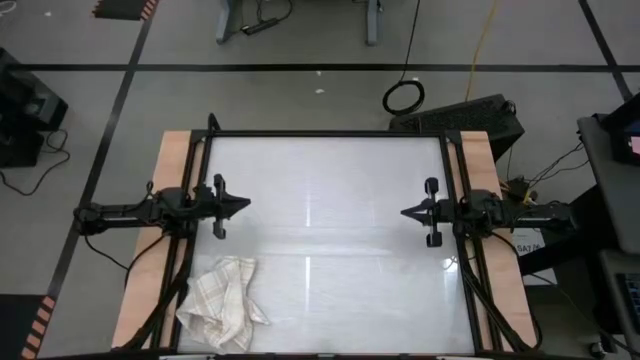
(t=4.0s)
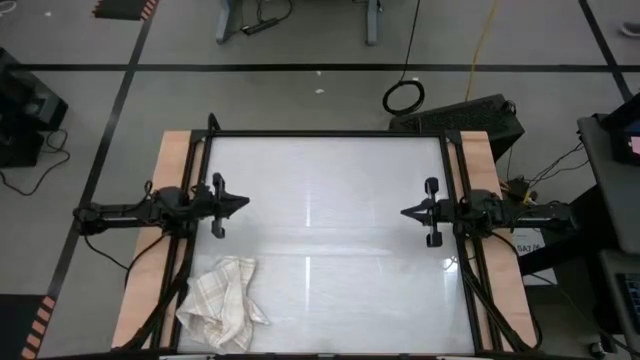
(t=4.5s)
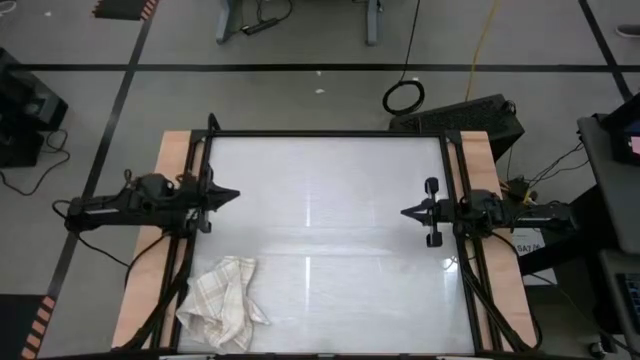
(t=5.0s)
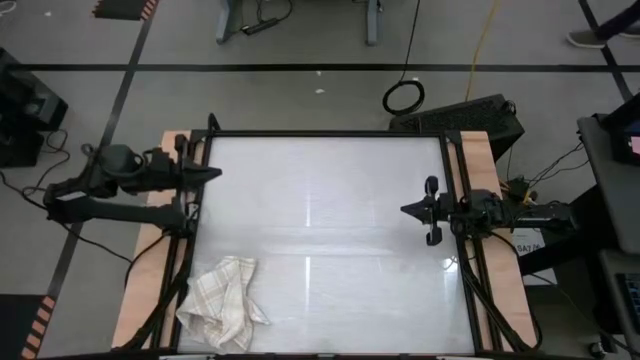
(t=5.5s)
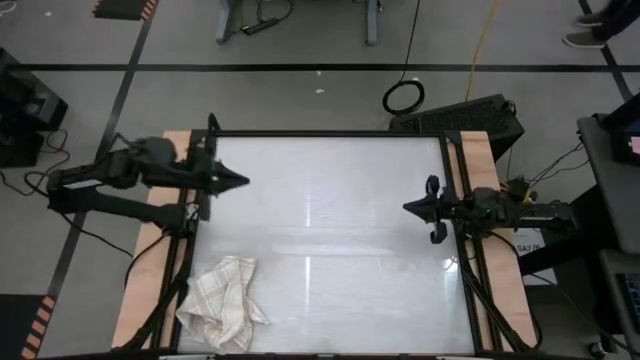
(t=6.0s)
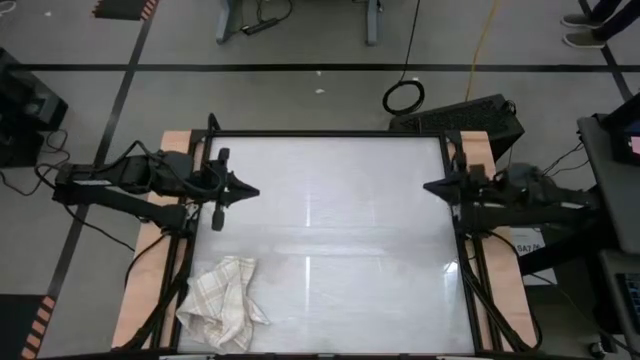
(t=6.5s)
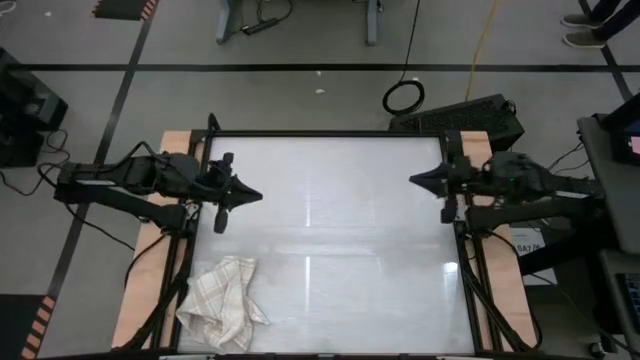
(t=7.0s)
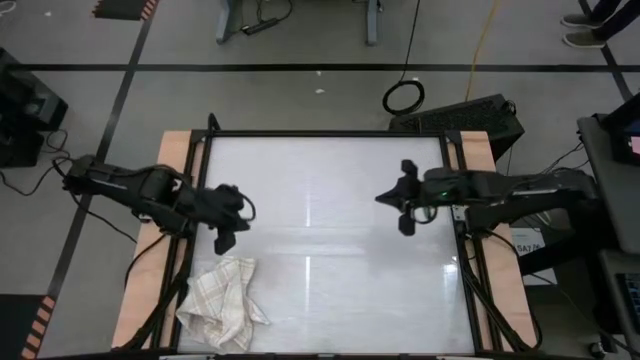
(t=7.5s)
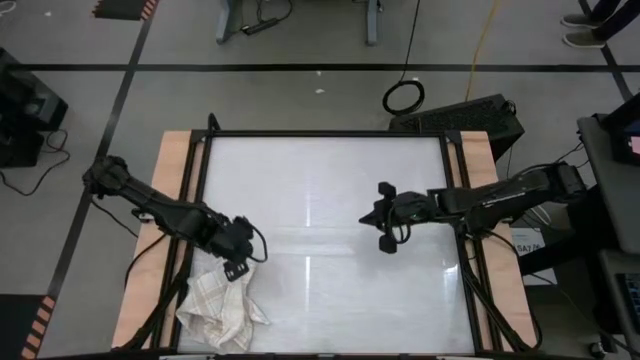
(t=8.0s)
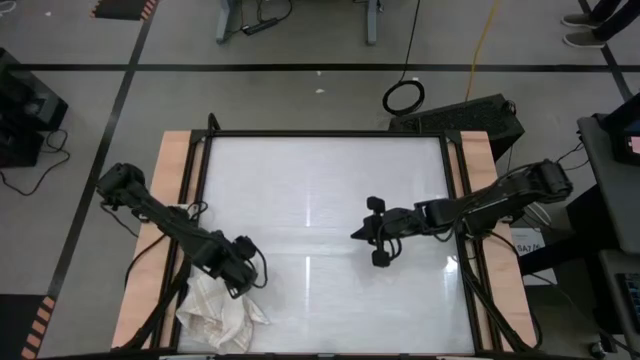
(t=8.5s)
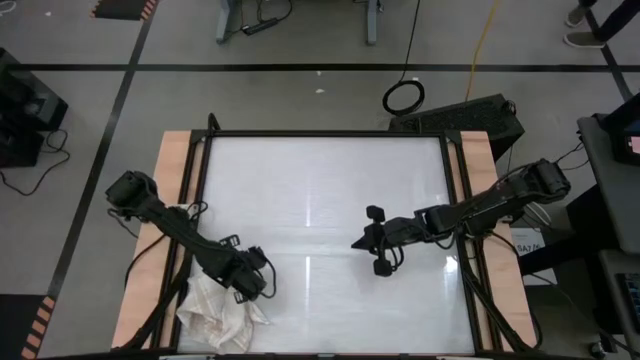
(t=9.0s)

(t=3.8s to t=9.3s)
Task: Roll towel
Roll the white towel

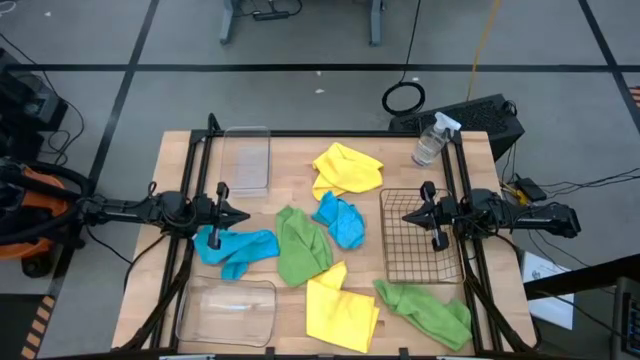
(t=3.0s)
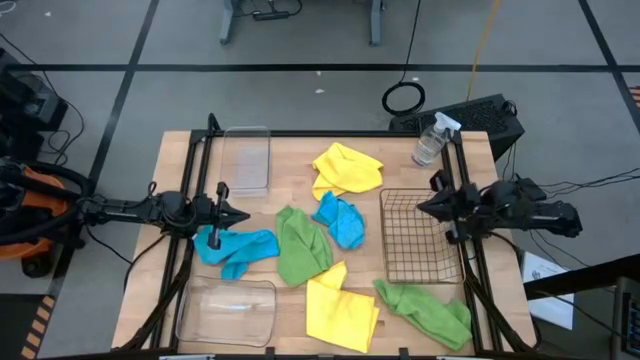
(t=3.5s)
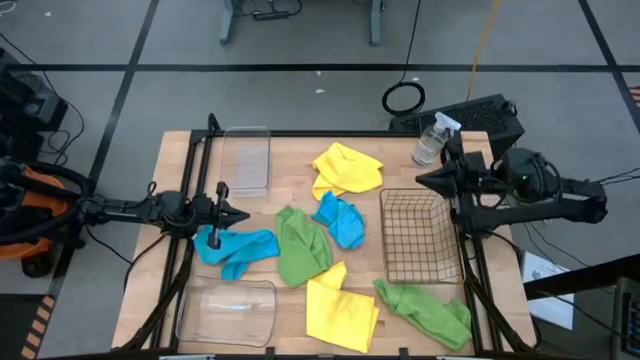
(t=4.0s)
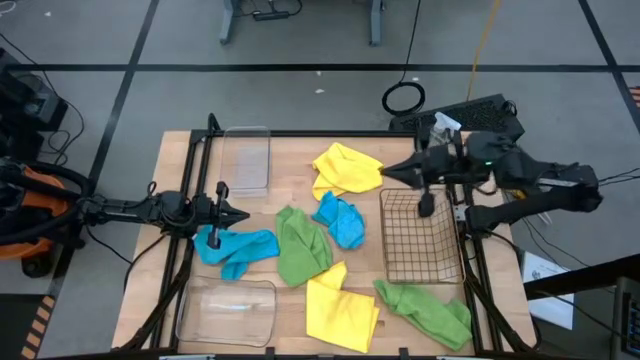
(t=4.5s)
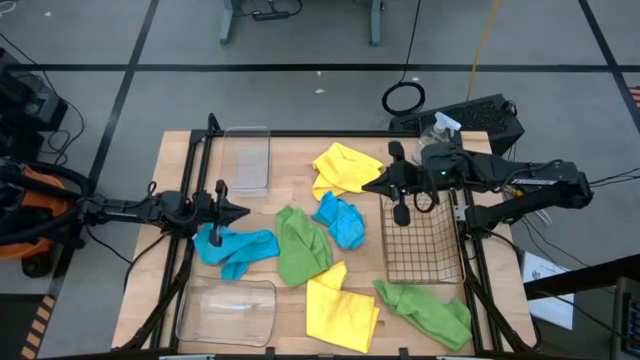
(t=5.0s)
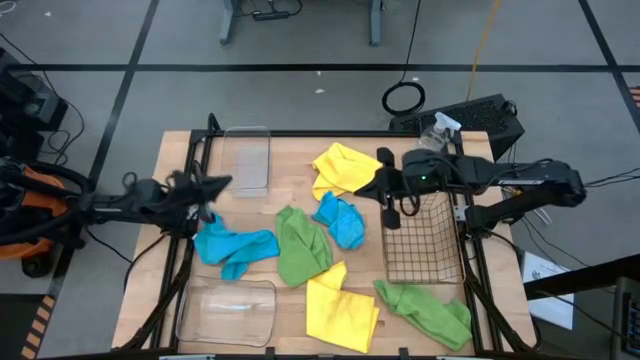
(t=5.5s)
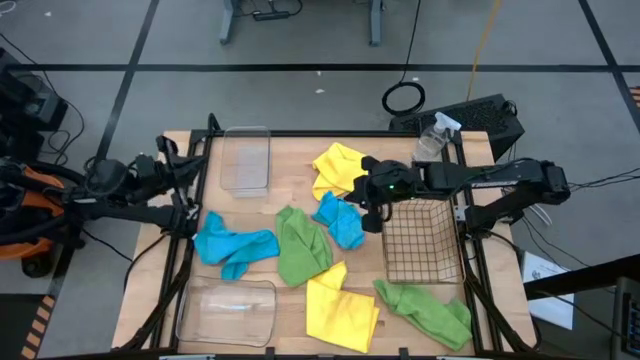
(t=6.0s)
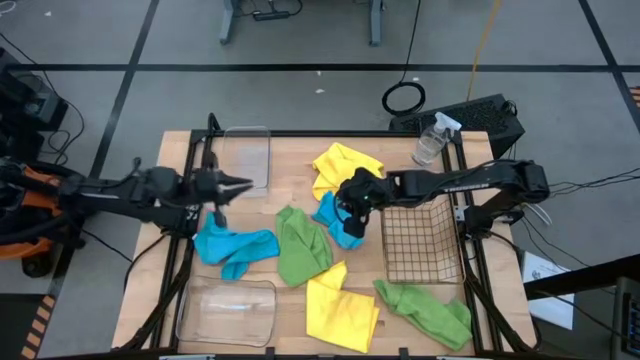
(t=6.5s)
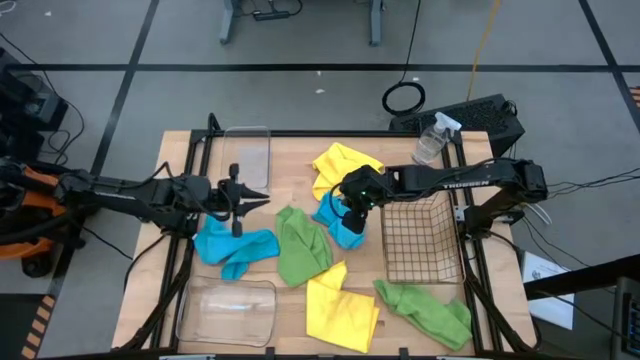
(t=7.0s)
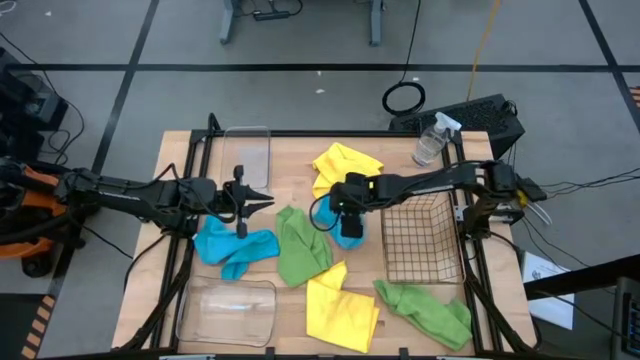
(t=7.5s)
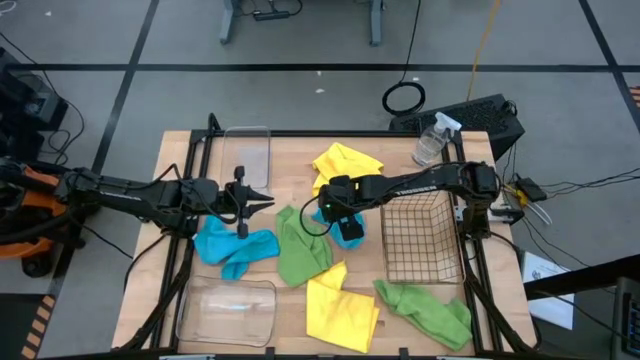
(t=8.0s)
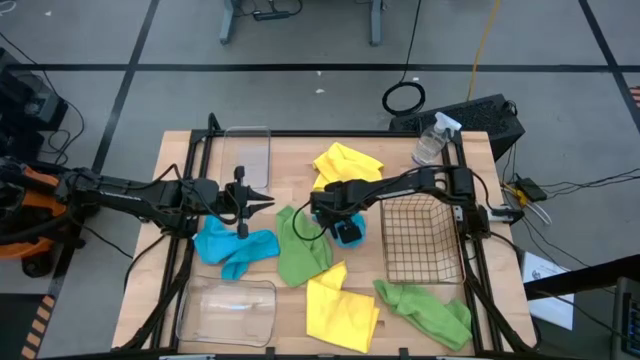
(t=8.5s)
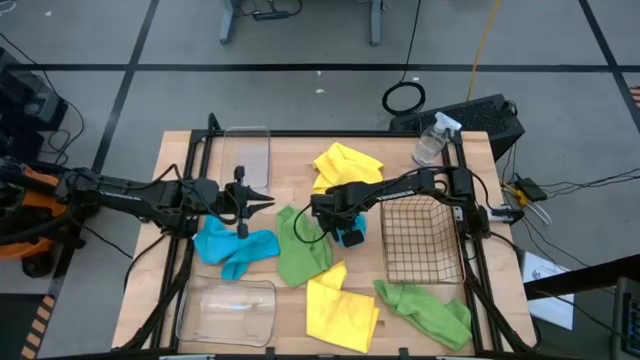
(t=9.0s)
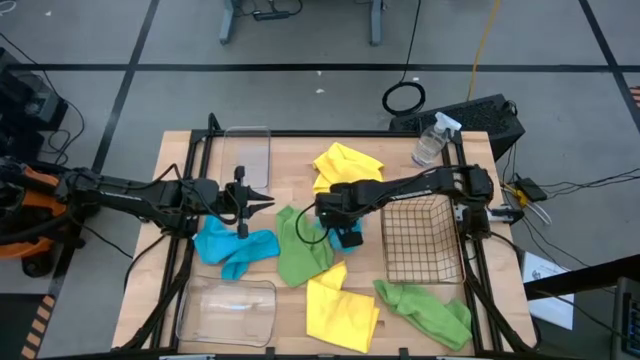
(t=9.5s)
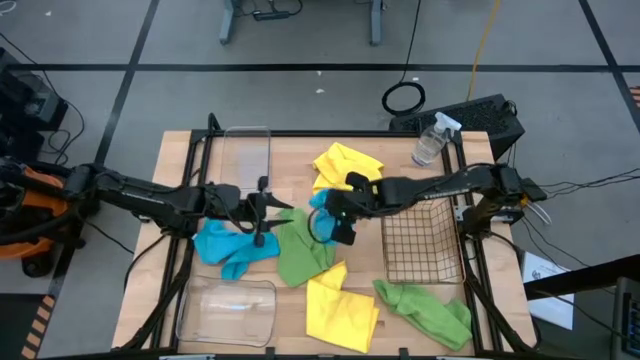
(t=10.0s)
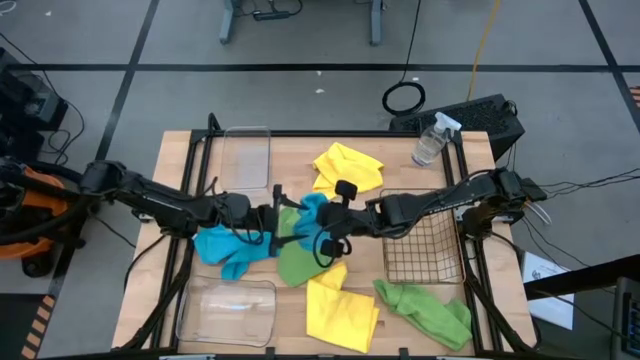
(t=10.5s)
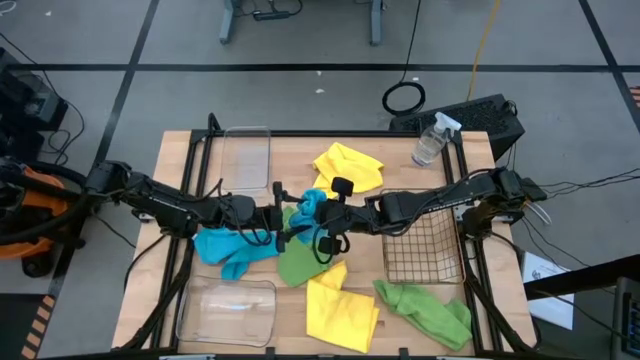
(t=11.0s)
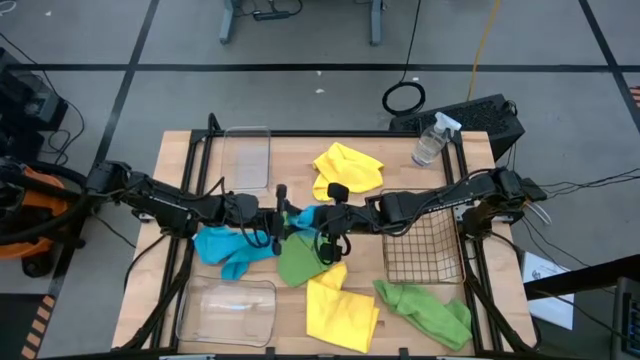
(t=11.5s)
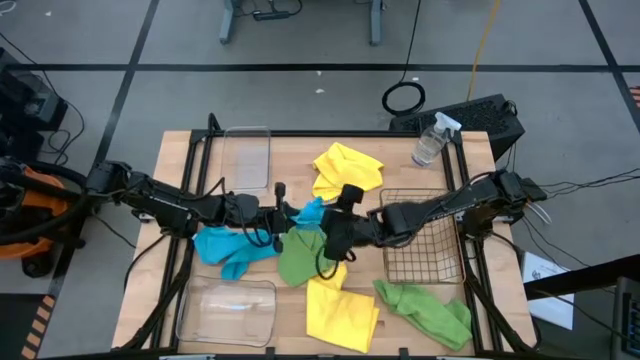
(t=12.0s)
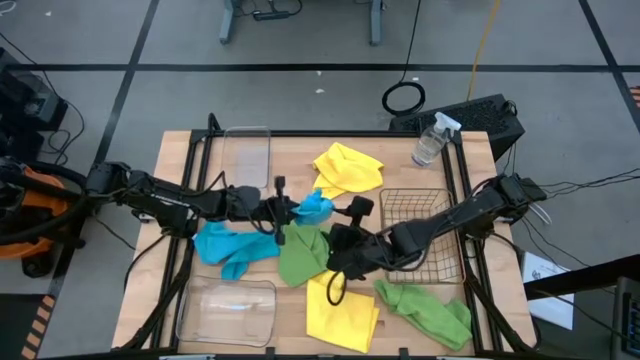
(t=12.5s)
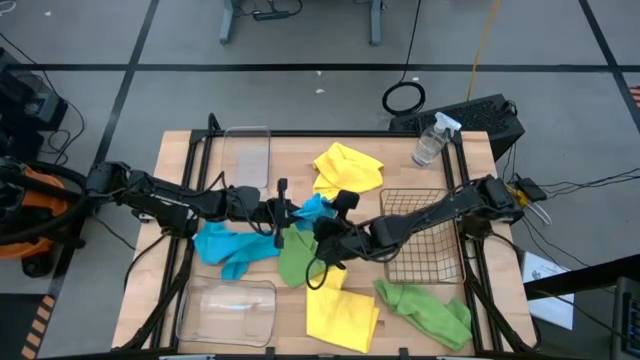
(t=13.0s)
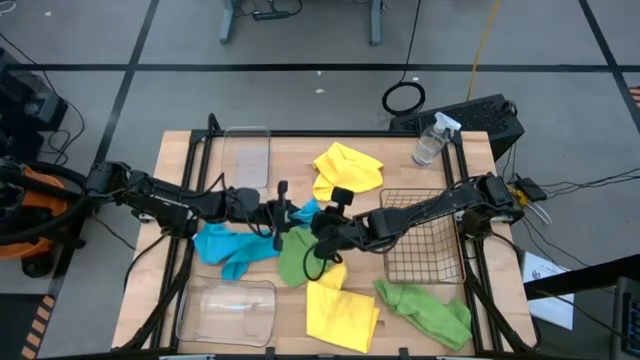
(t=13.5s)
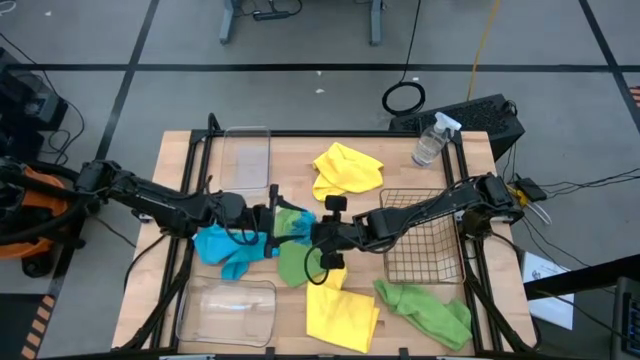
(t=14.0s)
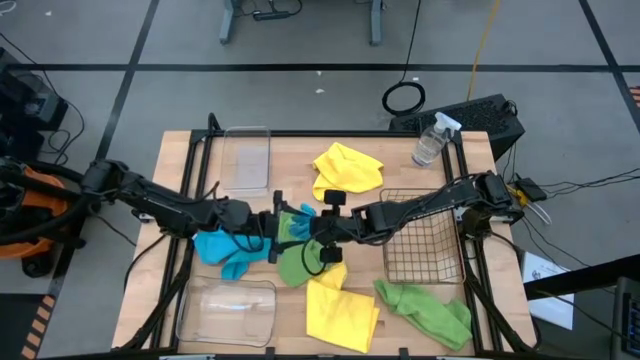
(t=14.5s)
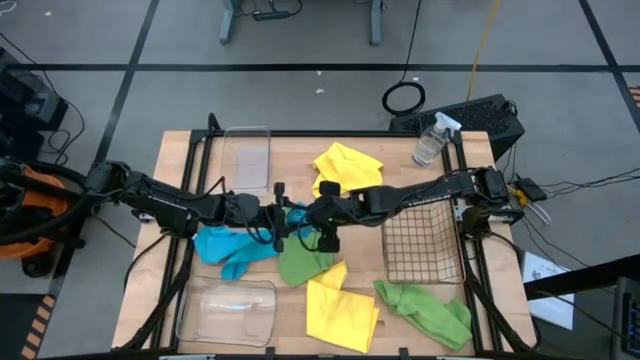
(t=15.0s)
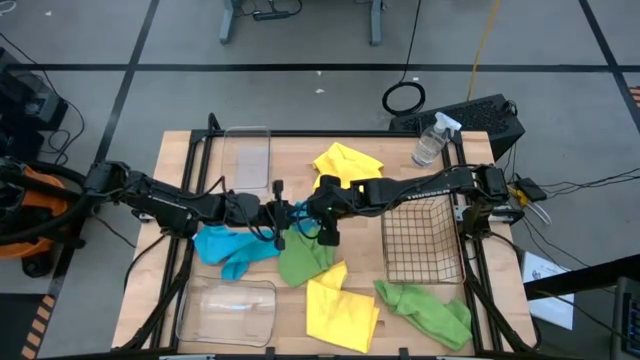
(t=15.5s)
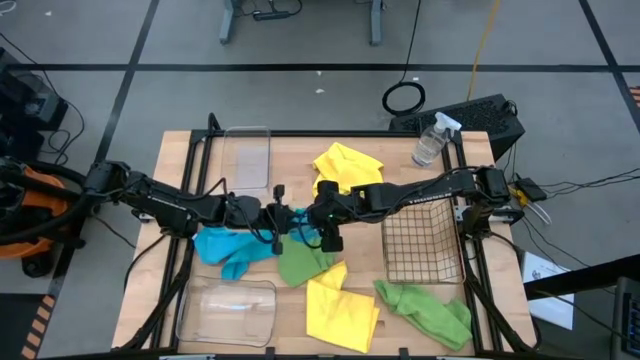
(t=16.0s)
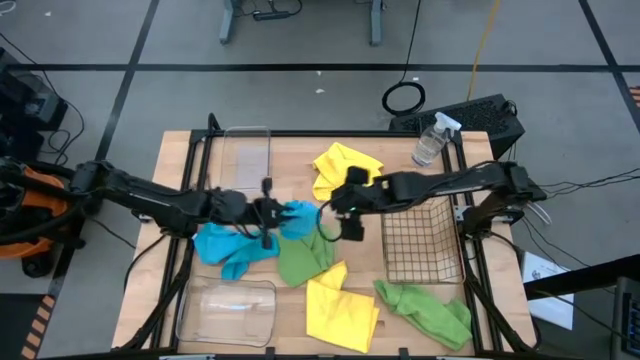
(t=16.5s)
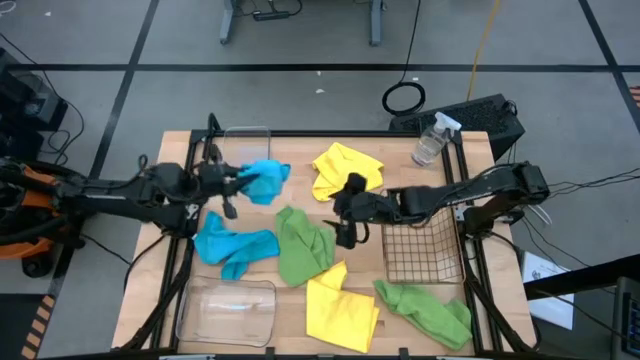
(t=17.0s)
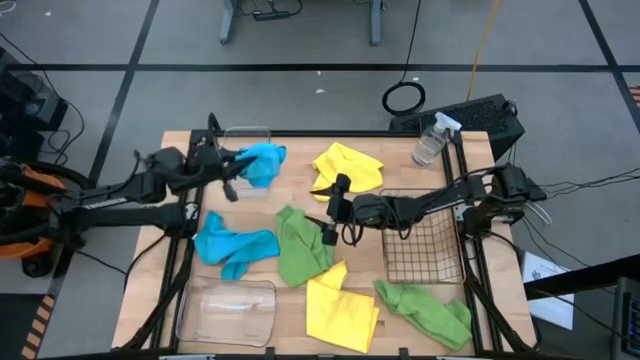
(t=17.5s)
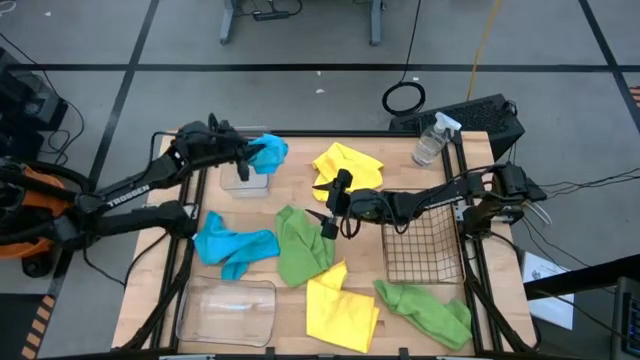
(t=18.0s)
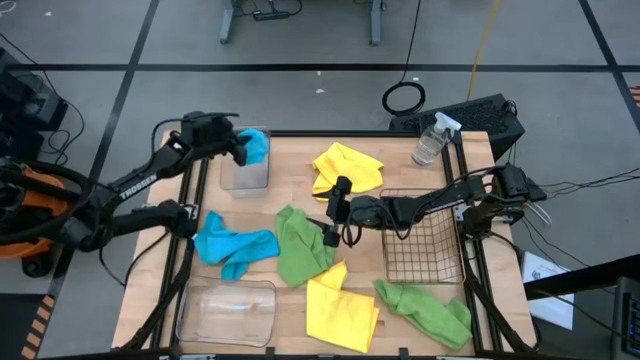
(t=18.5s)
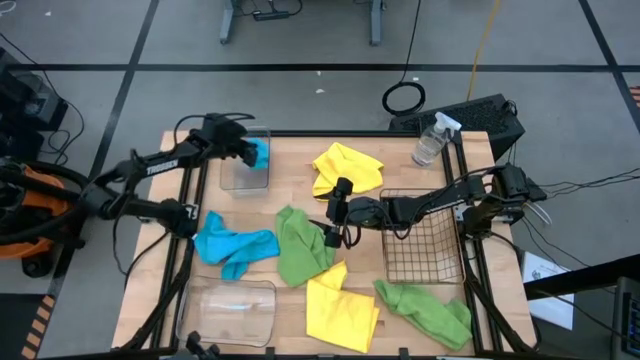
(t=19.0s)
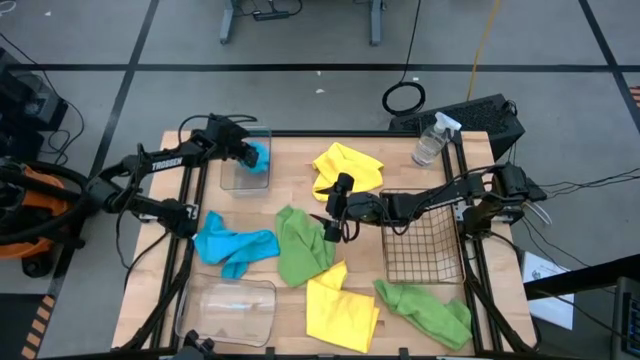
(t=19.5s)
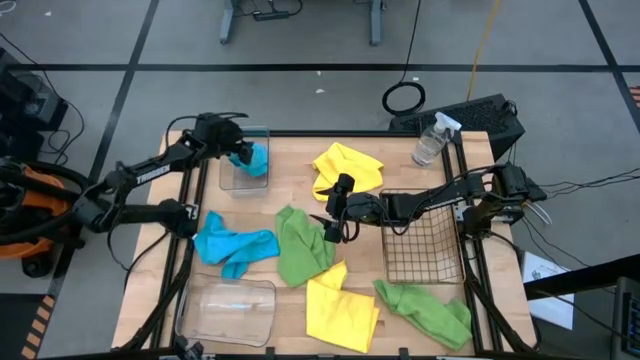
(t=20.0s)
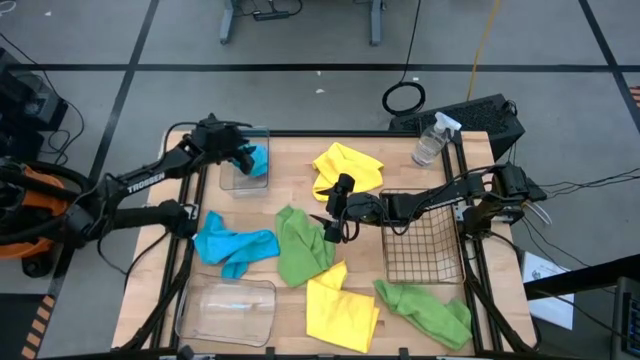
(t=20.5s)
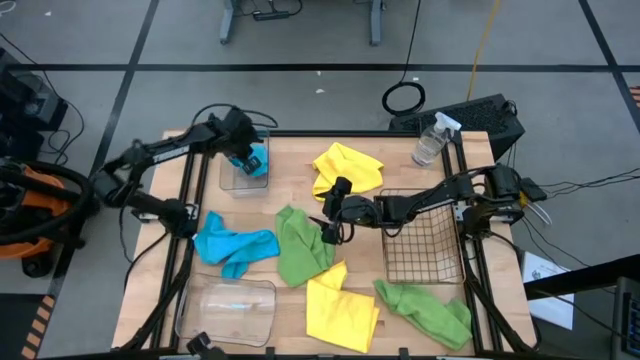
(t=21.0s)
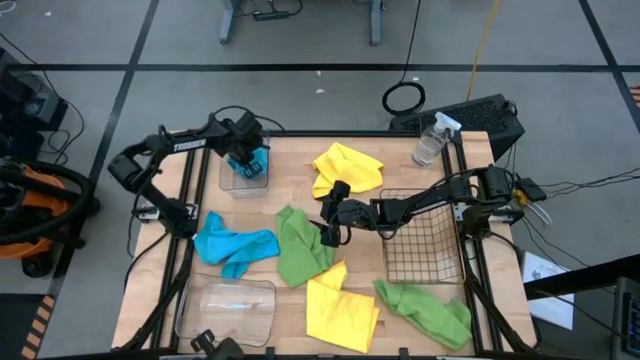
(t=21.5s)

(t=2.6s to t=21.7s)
Task: Sort microfiber towel by color & place in baskets
Put the right blue microfiber cloth into the top transparent bin
